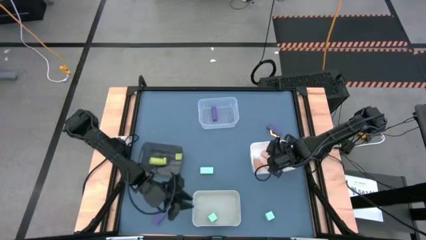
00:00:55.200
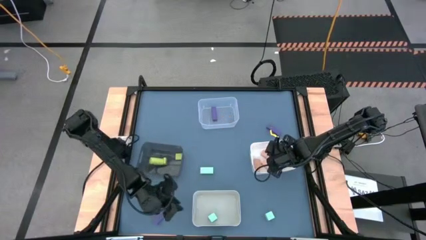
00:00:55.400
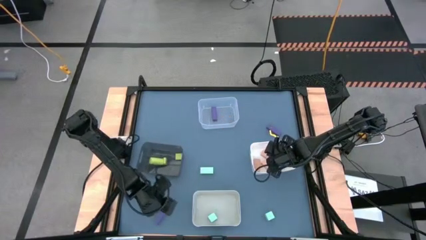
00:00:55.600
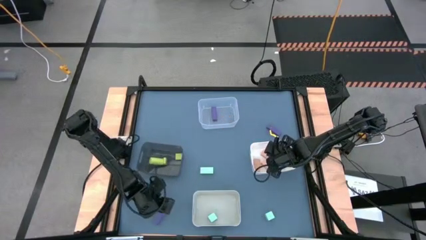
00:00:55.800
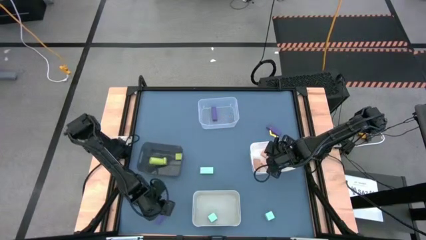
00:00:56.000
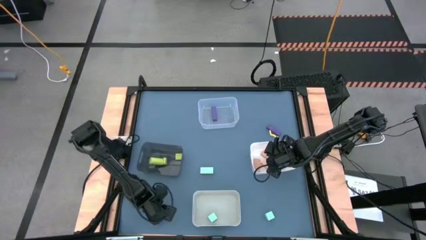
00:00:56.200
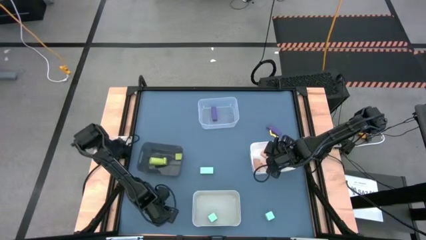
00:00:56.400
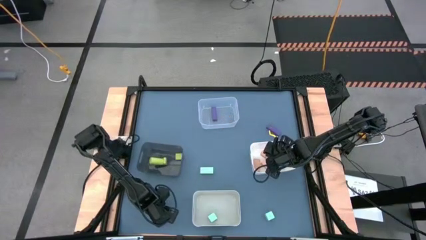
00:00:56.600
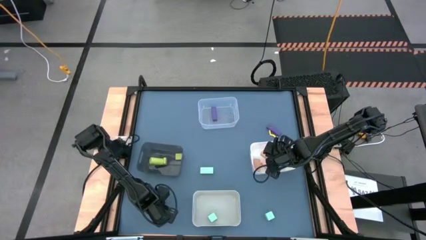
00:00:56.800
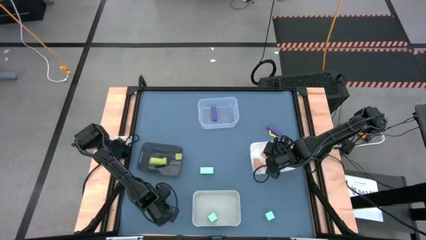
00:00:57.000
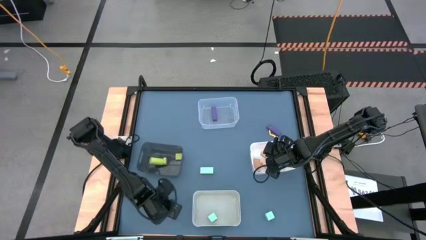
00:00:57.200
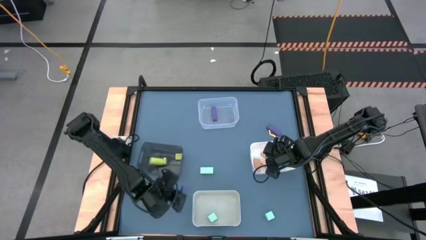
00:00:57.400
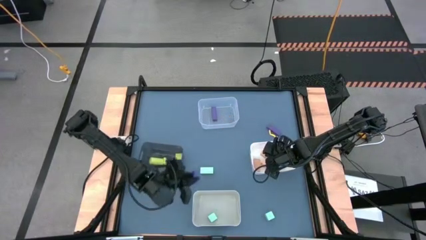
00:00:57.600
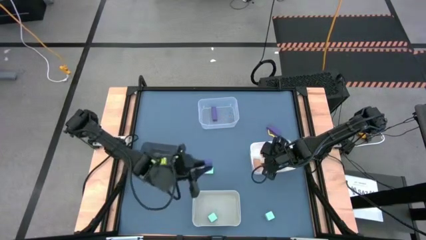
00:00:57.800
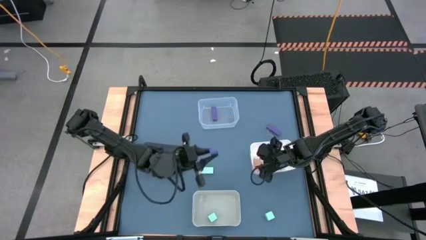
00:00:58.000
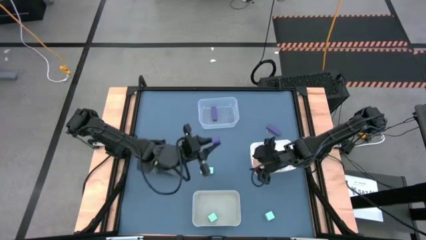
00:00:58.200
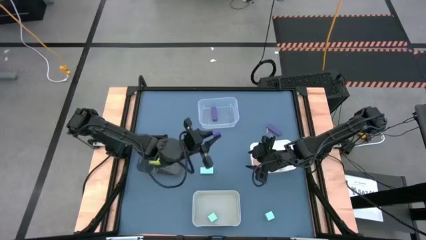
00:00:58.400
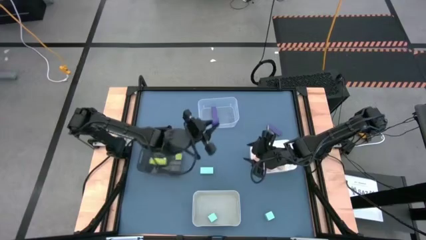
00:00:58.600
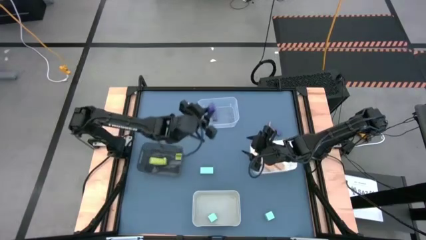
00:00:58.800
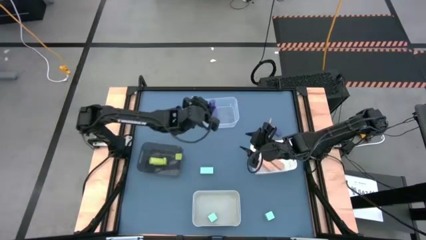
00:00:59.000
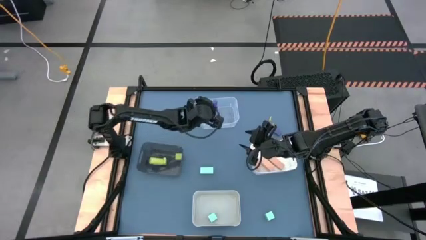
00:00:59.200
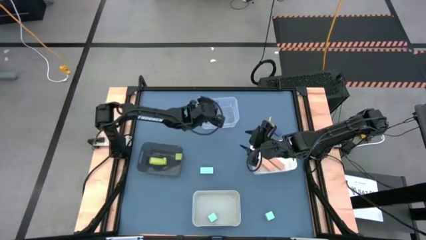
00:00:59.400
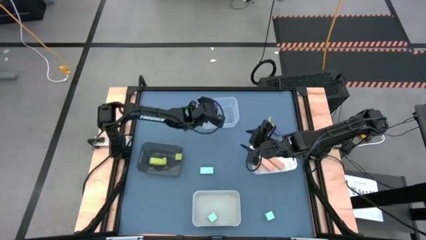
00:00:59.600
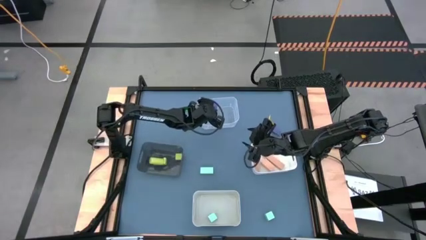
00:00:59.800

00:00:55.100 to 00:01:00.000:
Task: Sort & place blocks by color
Put the bottom violet block into the transparent bin

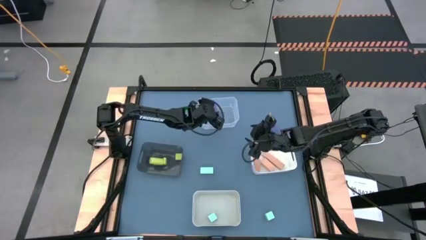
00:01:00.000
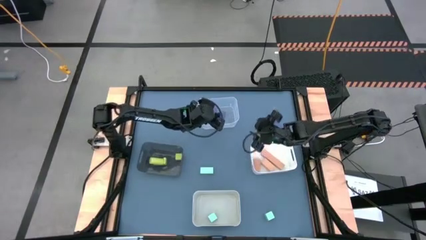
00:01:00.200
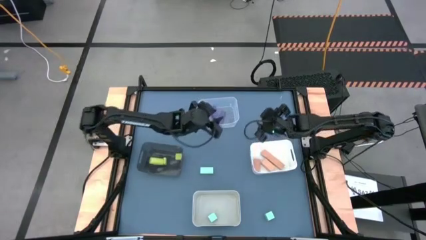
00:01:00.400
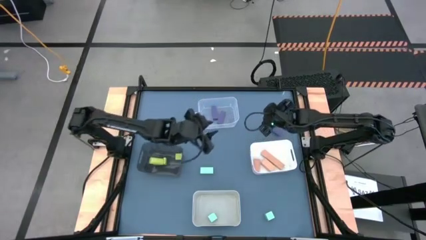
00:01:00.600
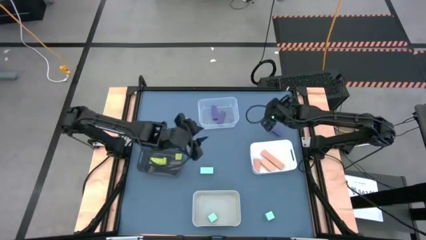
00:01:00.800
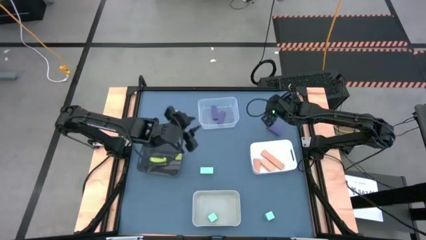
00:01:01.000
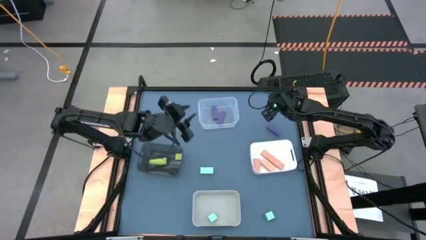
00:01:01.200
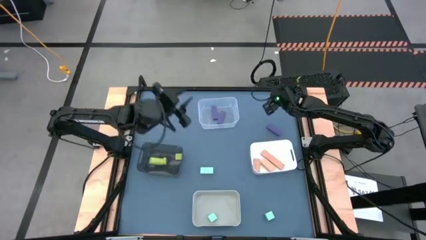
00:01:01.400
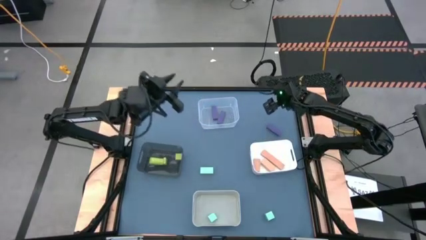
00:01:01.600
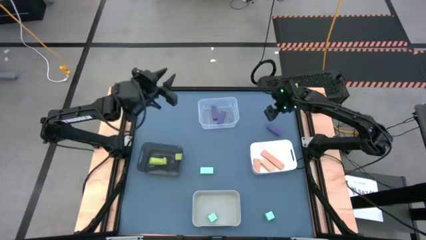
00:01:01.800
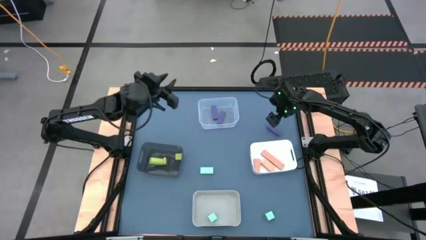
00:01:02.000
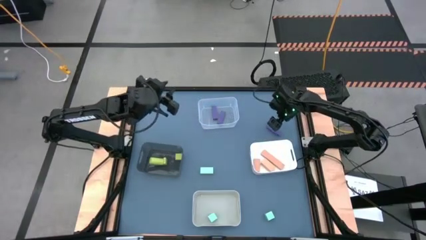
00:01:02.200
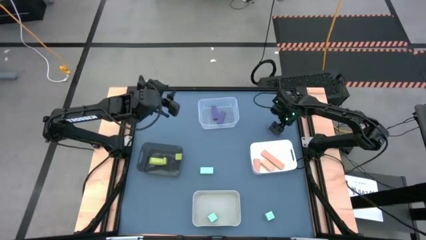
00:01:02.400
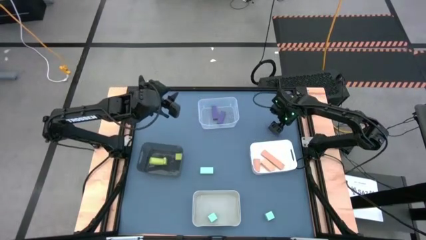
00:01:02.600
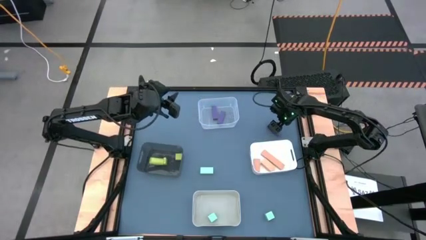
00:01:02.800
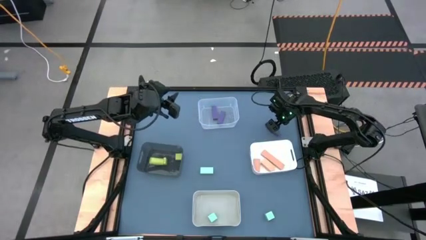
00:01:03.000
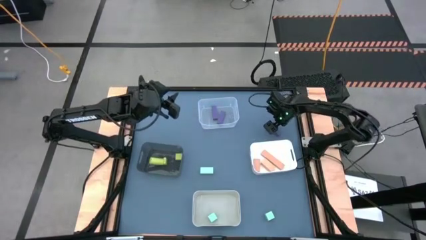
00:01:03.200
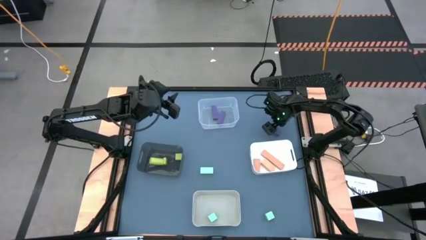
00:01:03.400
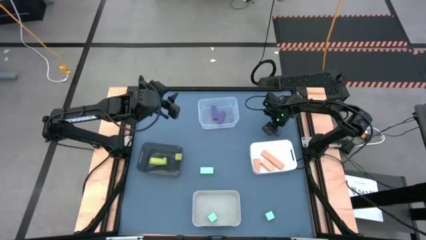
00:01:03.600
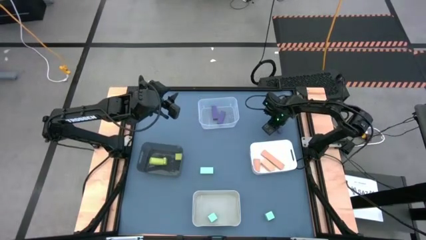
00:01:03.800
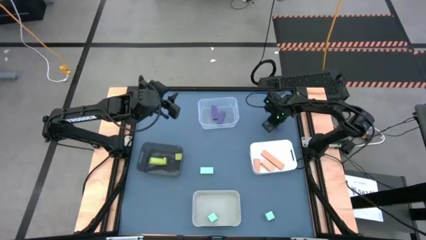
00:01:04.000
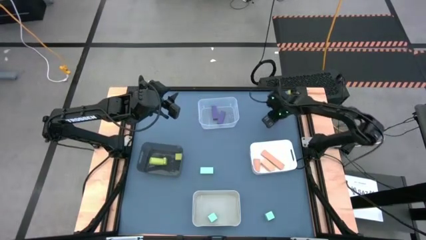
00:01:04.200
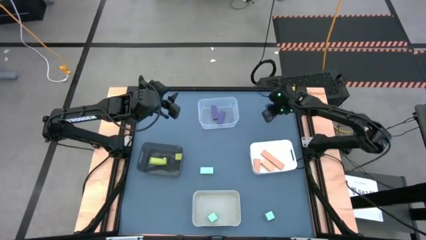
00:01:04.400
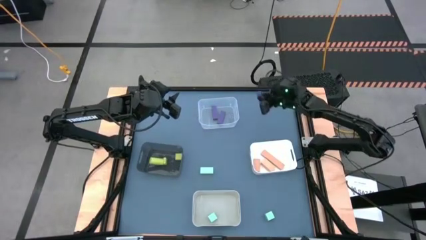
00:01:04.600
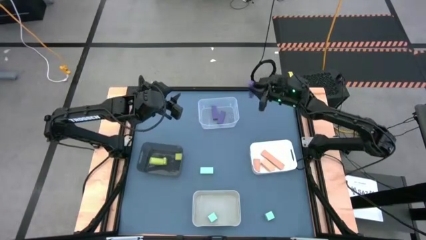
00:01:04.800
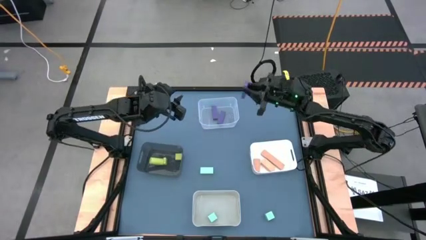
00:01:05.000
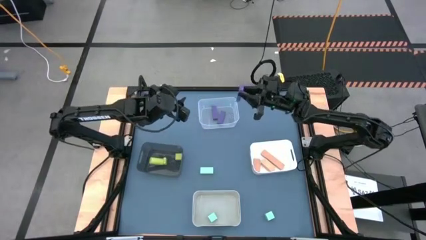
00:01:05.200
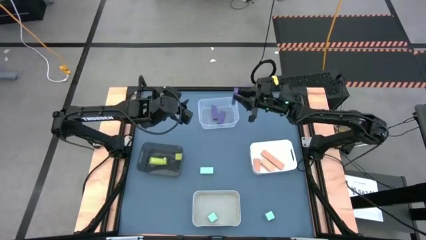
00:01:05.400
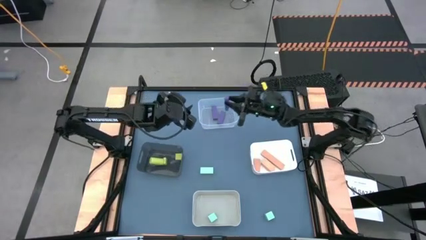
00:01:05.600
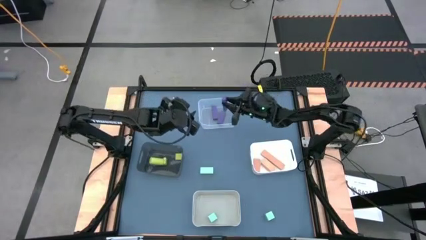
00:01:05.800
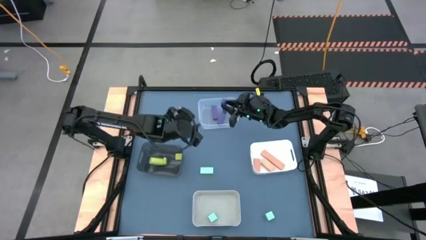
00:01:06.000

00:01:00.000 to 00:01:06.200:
Put the violet block into the transparent bin

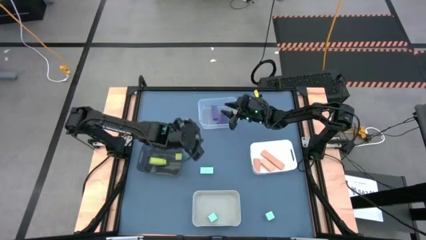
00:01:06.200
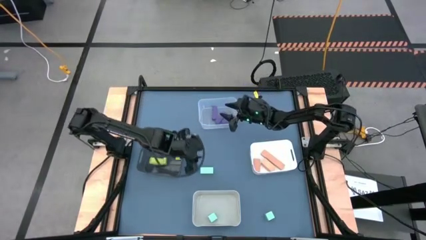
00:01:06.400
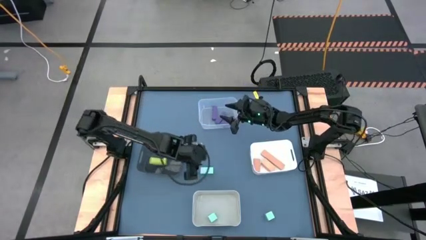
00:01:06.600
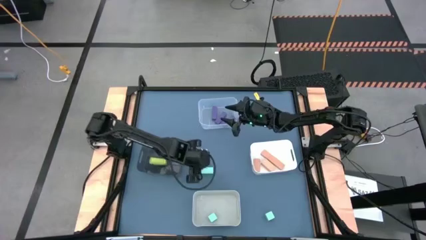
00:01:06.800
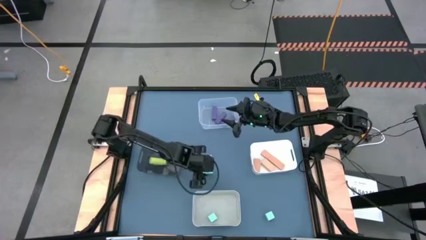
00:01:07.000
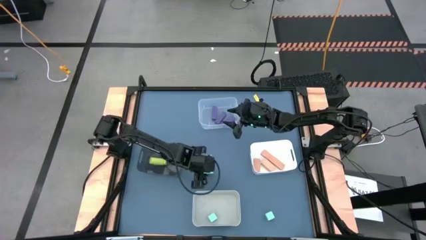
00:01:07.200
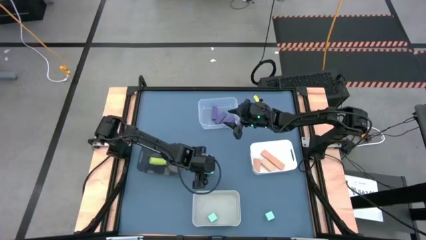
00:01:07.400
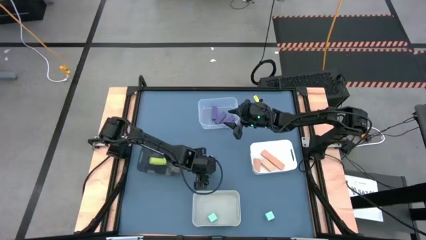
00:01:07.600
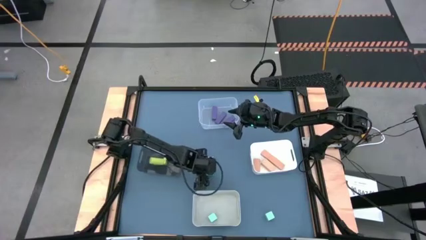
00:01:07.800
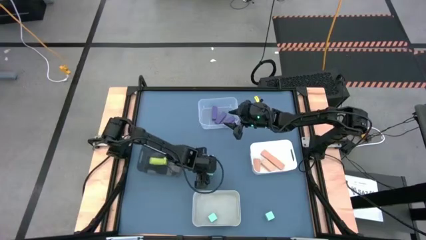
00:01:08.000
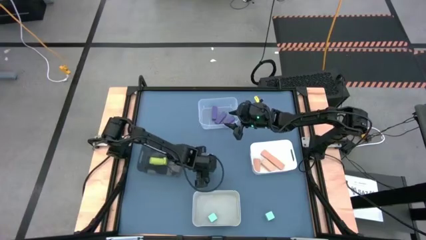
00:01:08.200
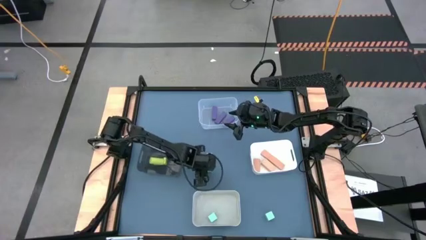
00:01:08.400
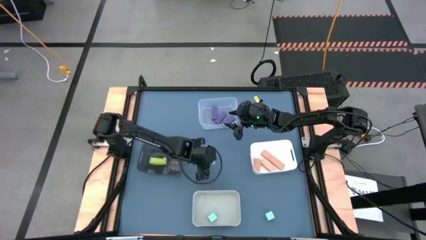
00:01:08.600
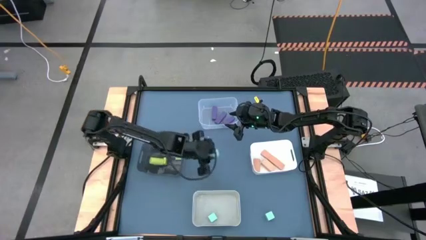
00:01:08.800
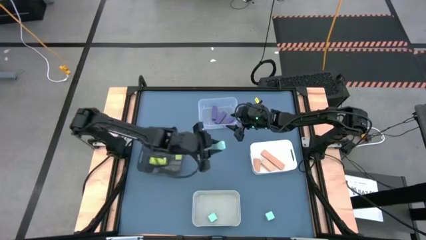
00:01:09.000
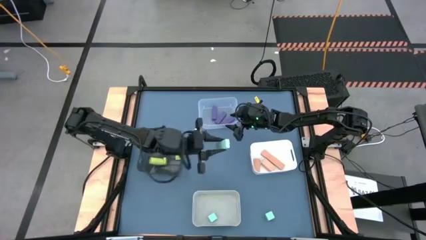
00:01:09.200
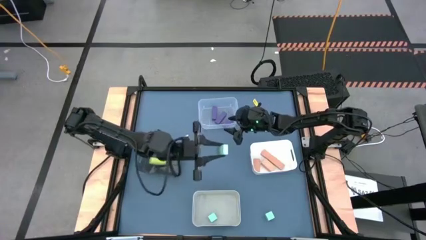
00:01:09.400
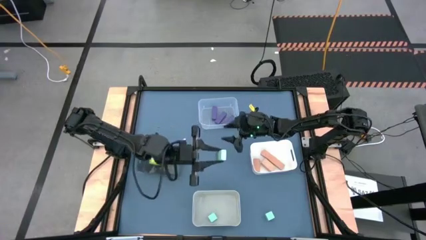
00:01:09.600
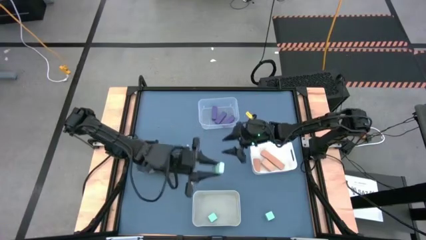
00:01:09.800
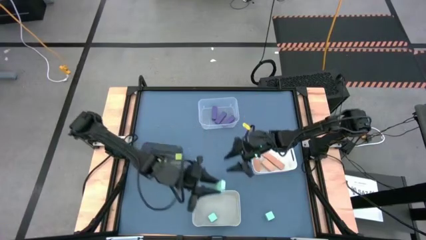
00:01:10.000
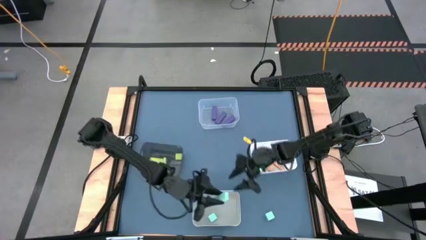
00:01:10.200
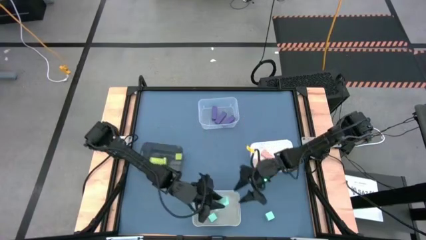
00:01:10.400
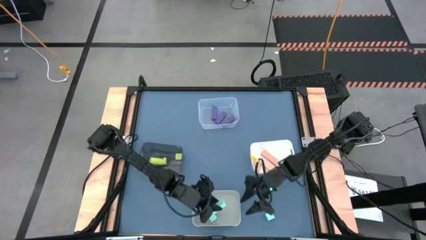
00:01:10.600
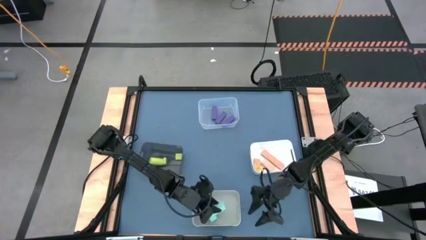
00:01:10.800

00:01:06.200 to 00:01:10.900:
Put the top light blue block into the gray bin
